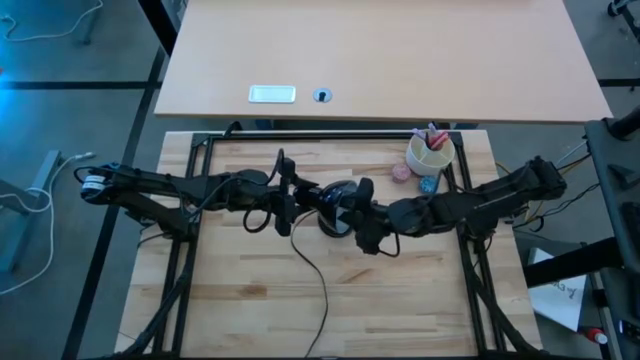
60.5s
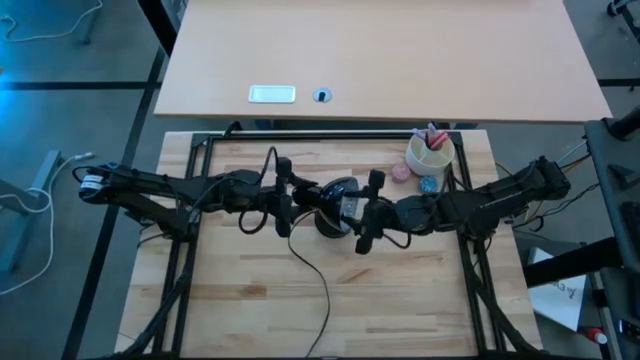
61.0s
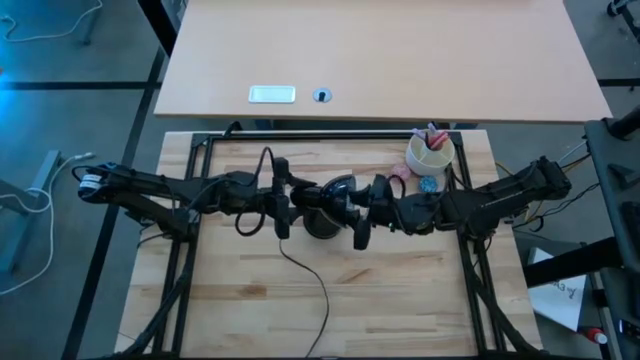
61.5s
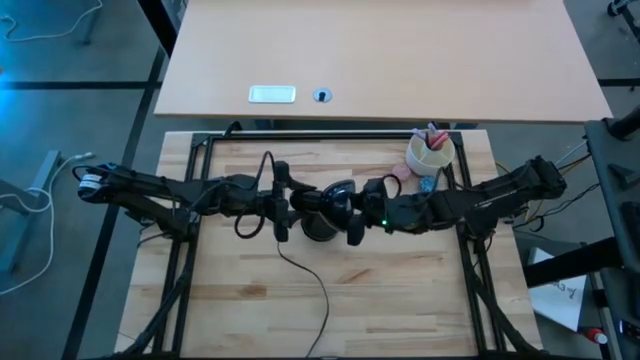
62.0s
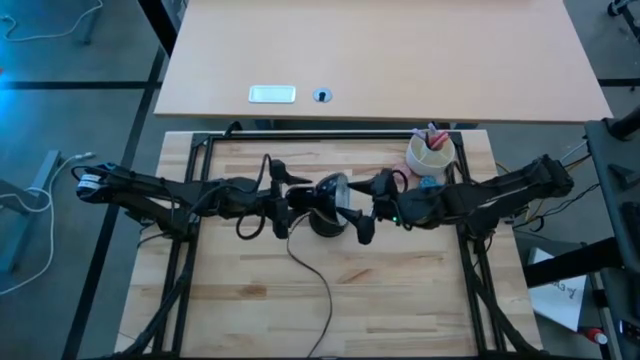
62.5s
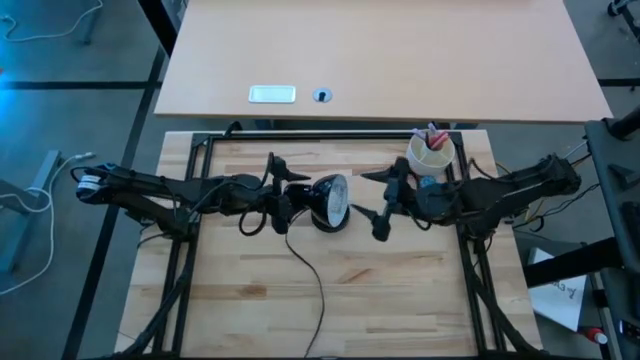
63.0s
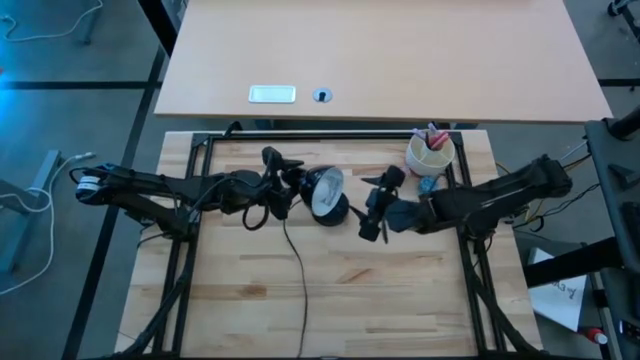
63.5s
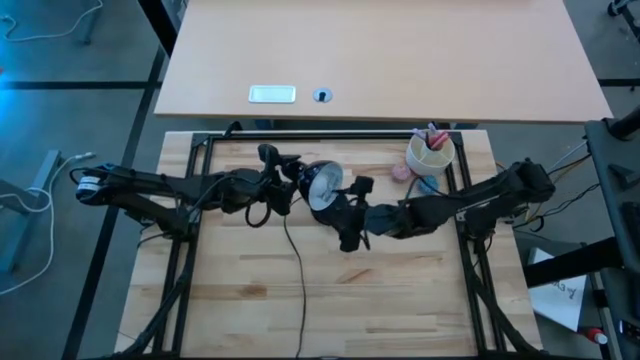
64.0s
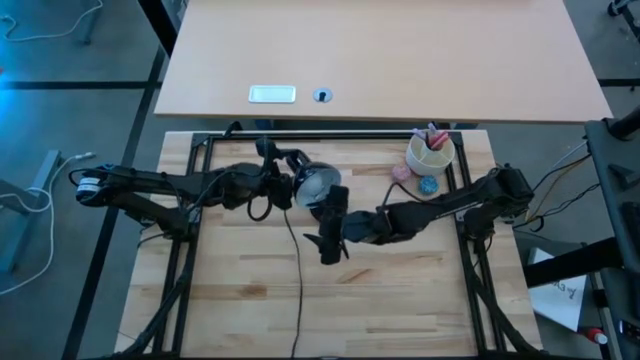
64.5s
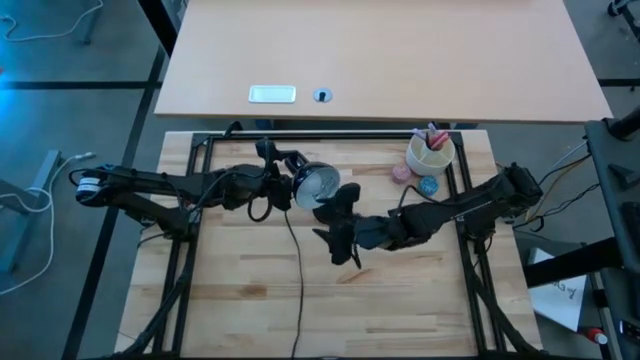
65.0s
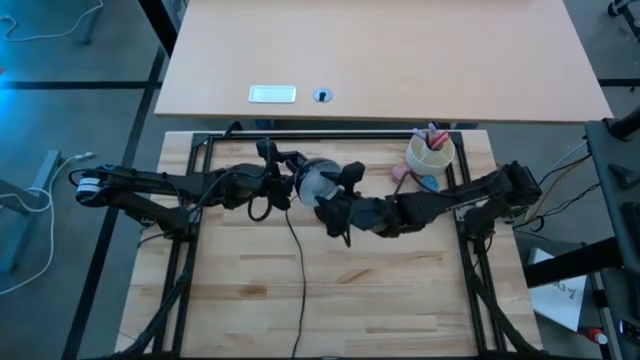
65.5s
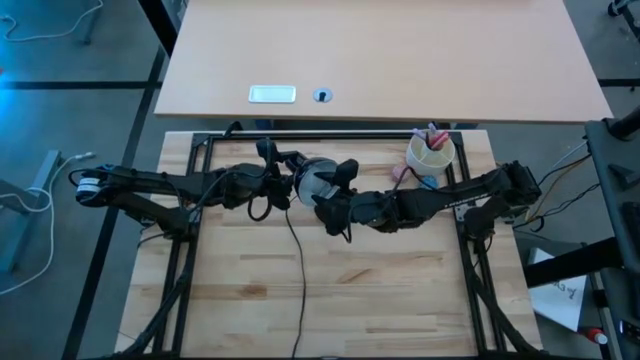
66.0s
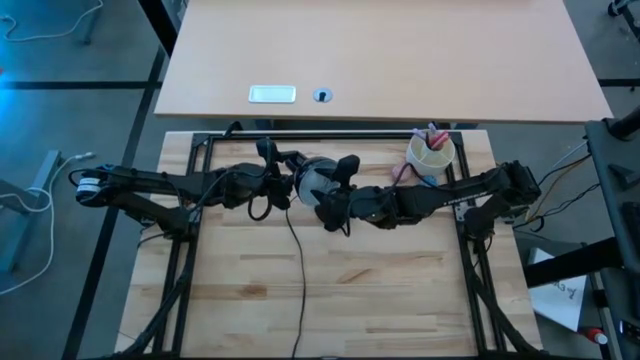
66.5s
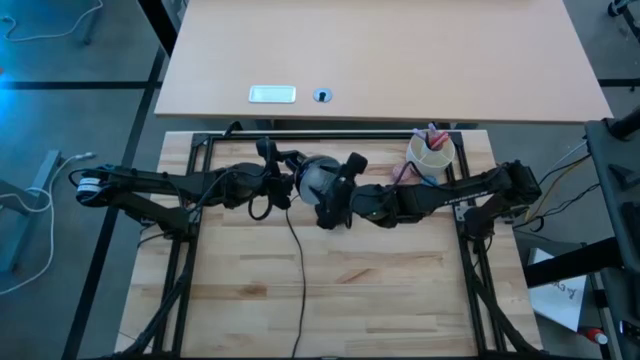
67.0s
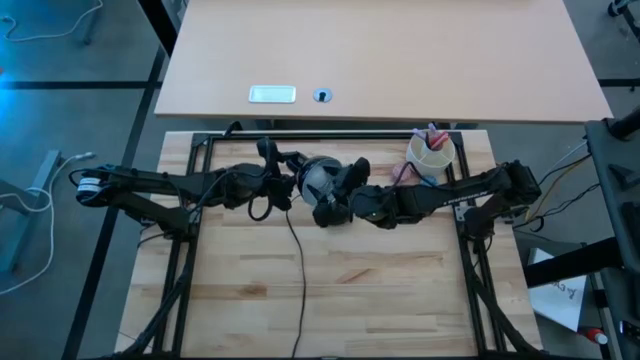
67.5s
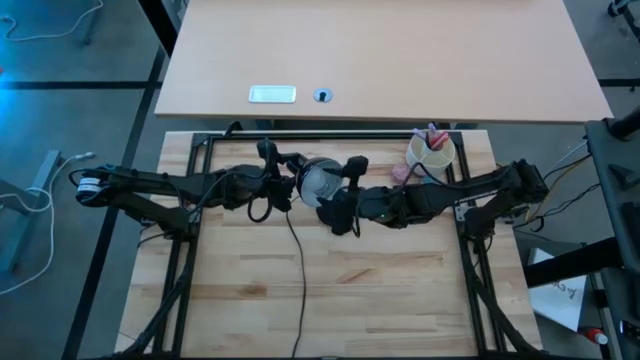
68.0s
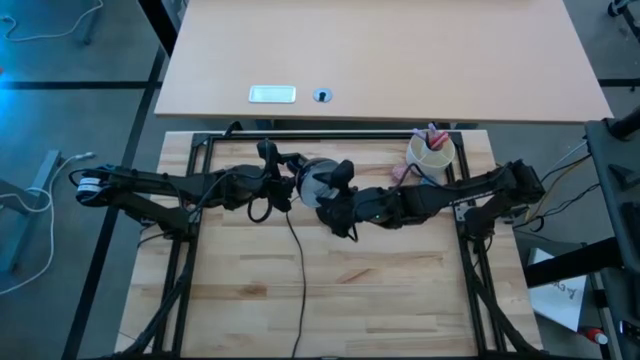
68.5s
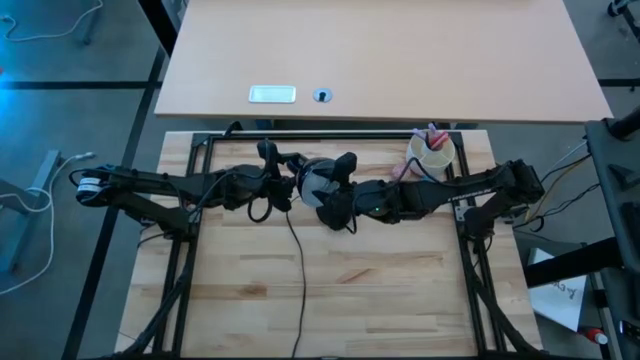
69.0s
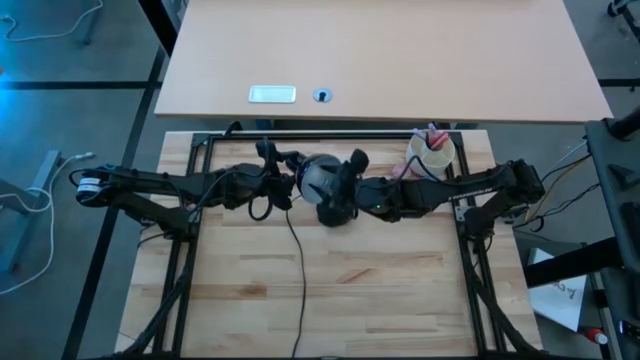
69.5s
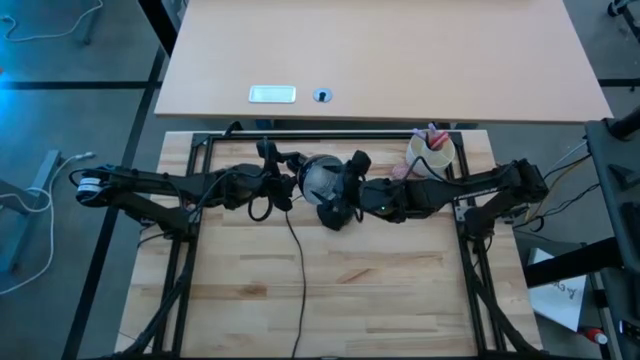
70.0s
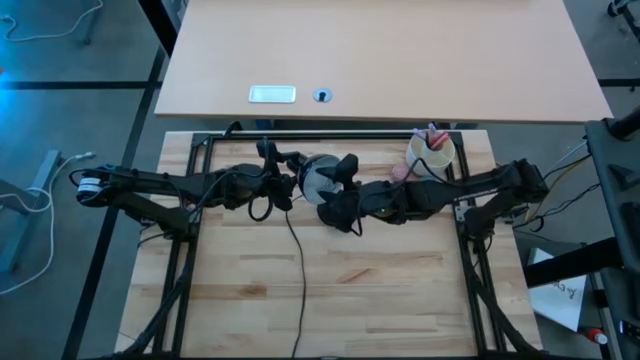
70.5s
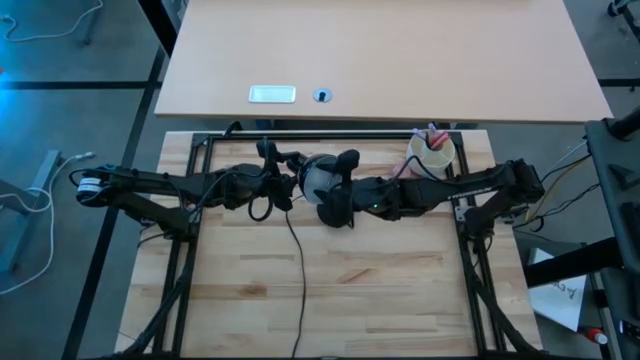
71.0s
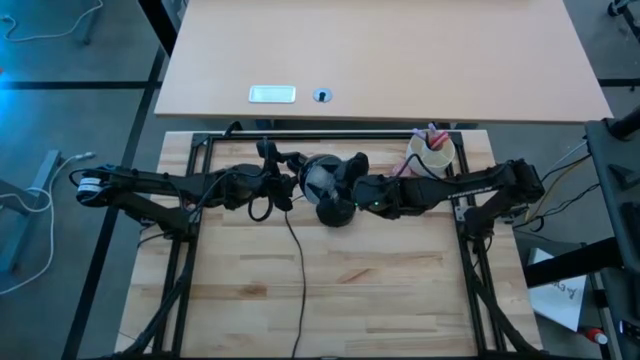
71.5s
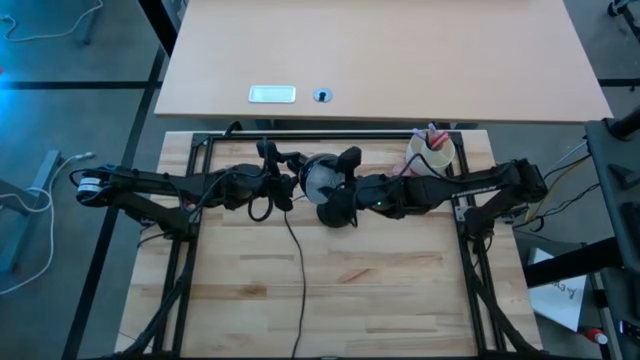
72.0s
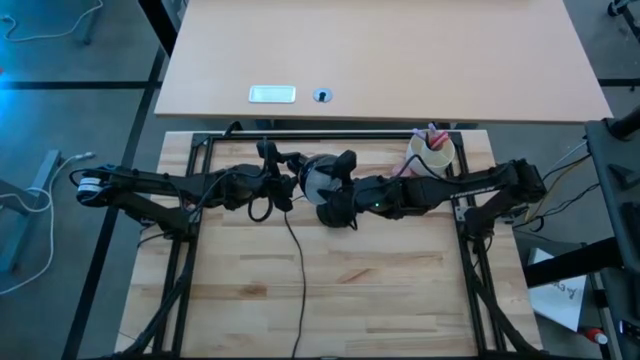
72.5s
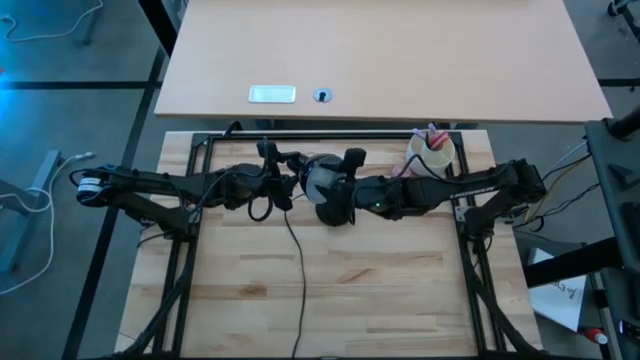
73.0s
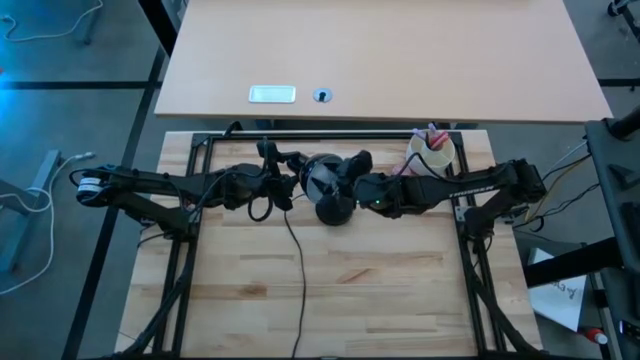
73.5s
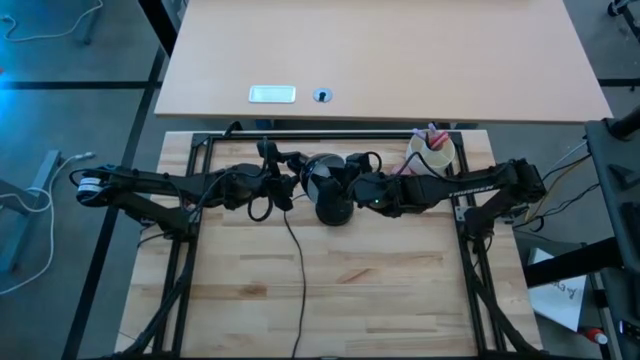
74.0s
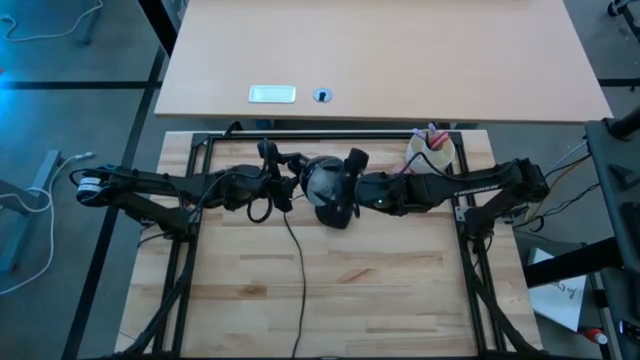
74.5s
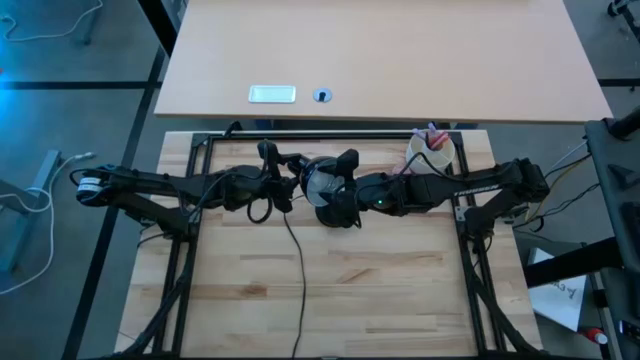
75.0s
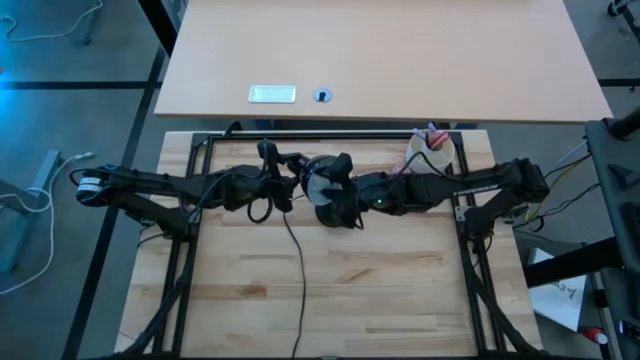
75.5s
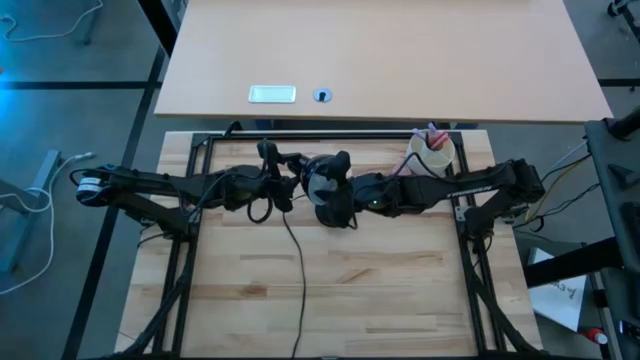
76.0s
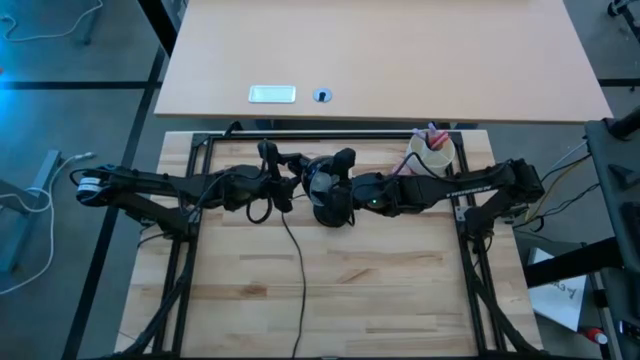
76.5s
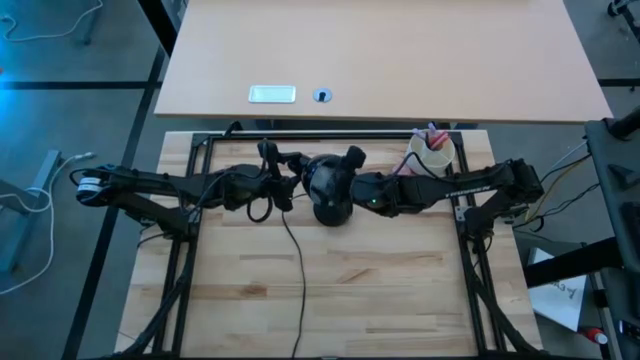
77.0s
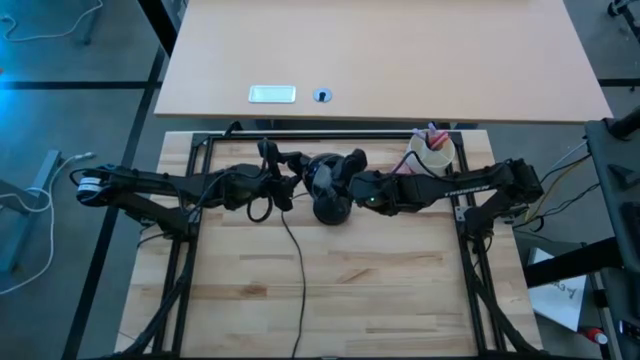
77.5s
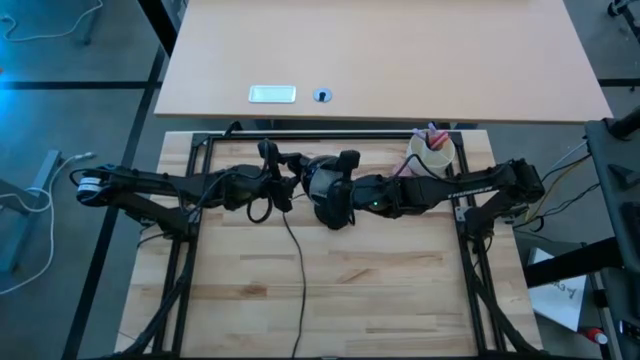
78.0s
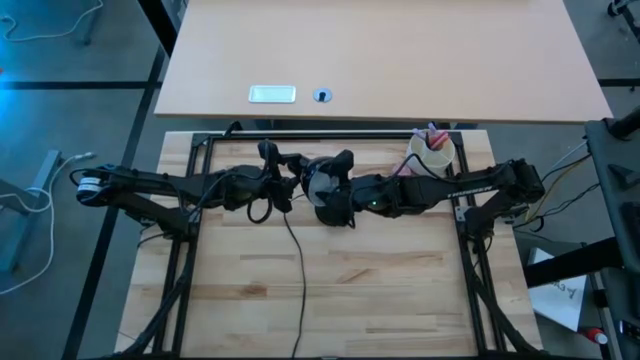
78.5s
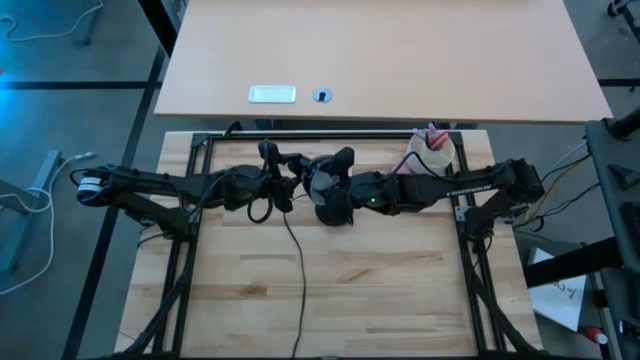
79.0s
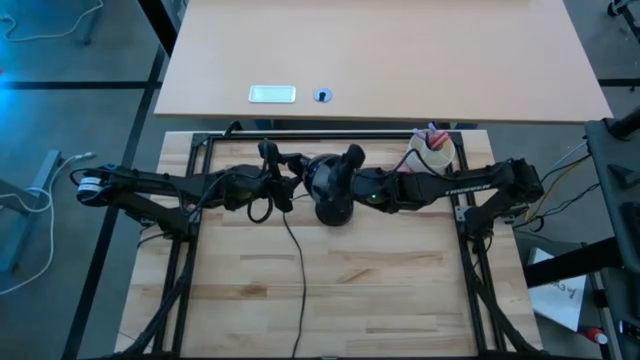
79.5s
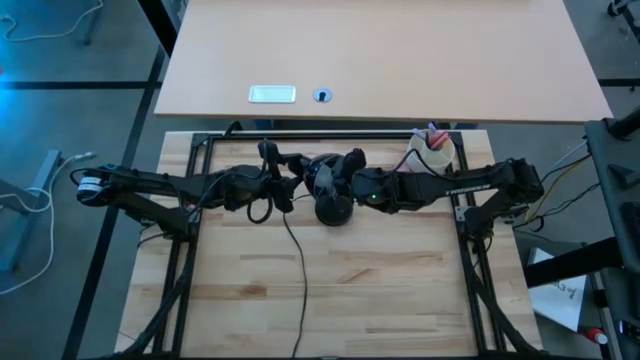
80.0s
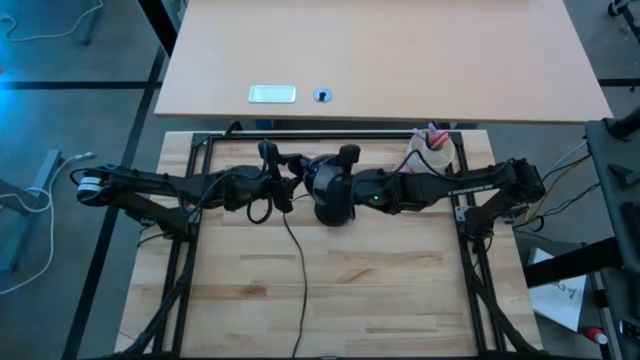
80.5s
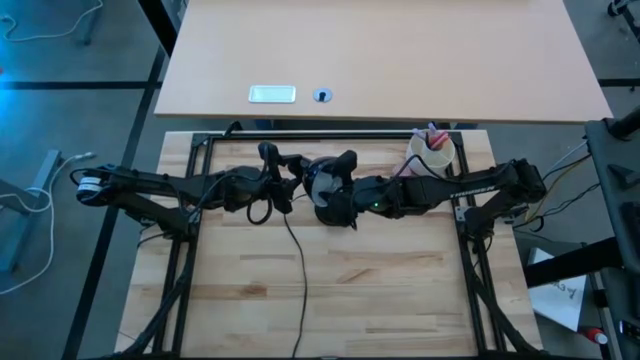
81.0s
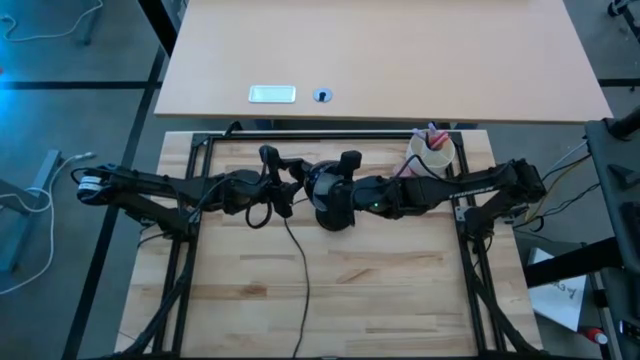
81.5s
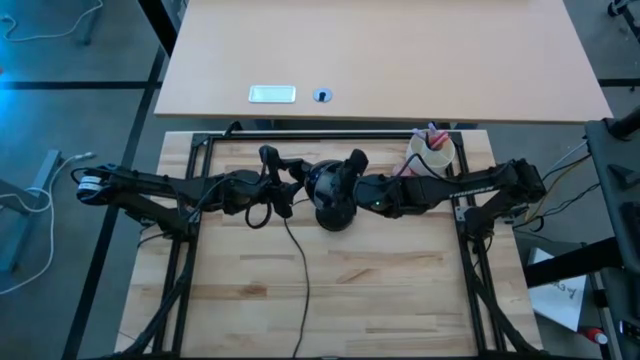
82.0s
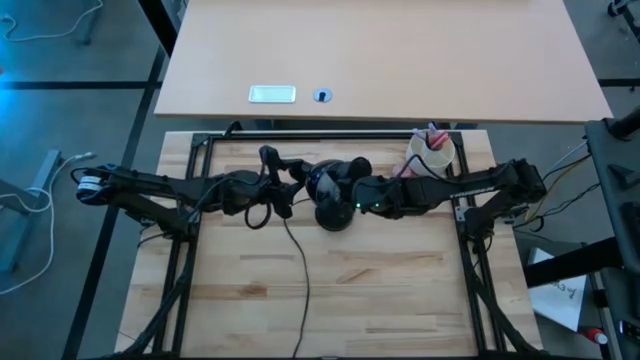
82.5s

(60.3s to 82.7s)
Task: Screw lightbulb
Insert the lightbulb into the lamp
